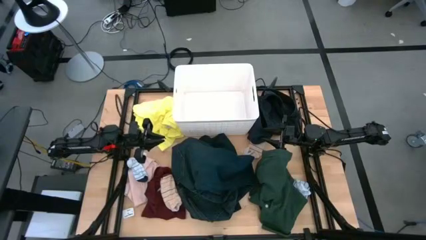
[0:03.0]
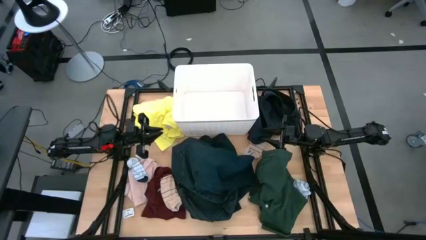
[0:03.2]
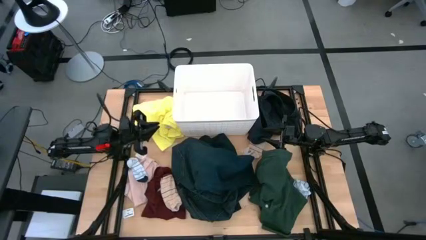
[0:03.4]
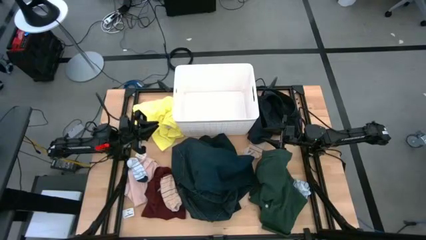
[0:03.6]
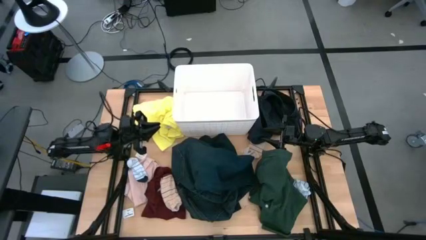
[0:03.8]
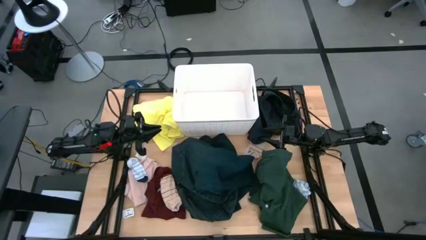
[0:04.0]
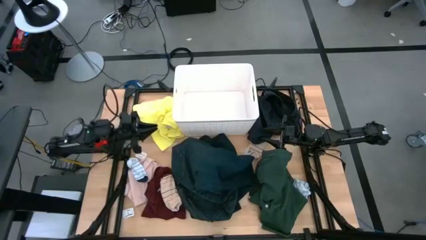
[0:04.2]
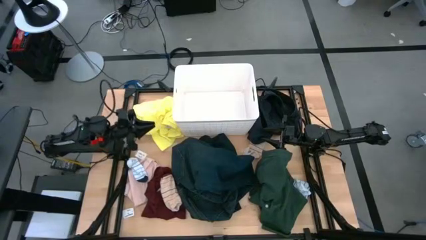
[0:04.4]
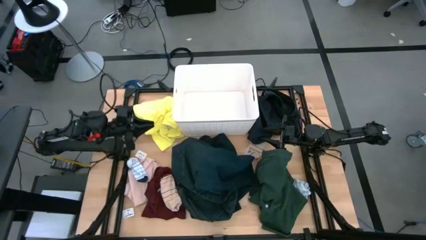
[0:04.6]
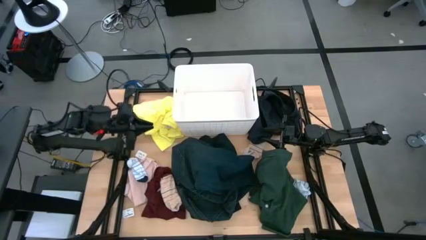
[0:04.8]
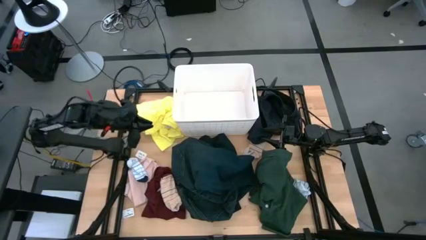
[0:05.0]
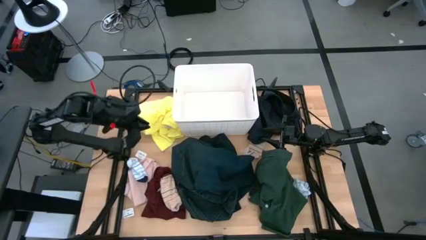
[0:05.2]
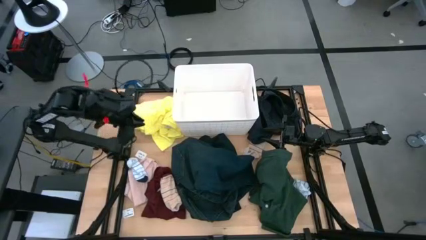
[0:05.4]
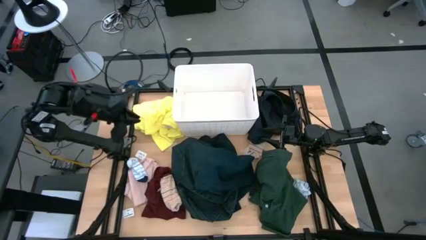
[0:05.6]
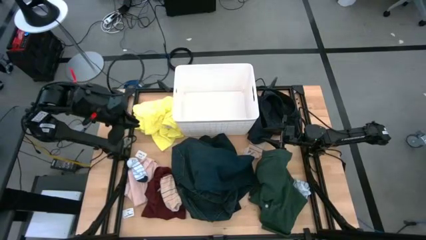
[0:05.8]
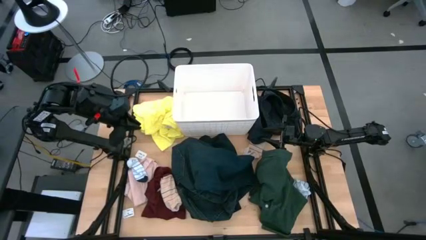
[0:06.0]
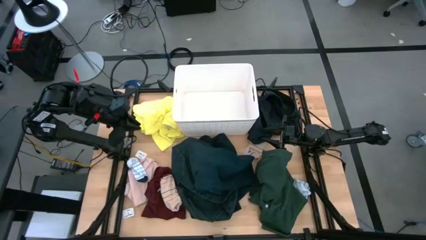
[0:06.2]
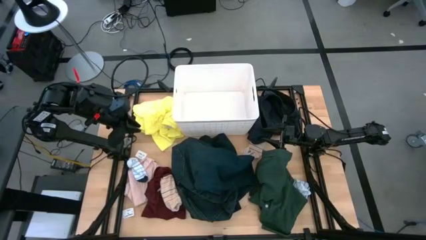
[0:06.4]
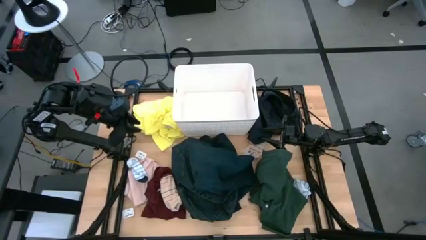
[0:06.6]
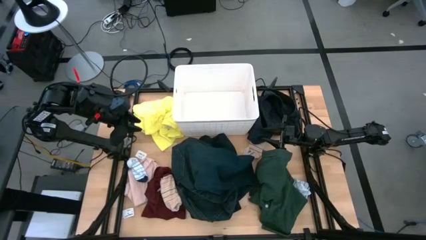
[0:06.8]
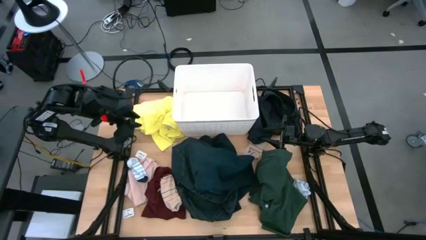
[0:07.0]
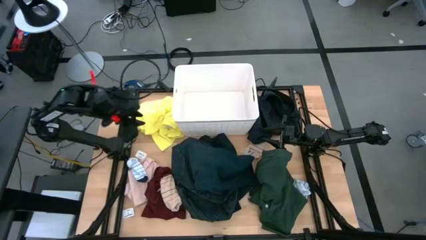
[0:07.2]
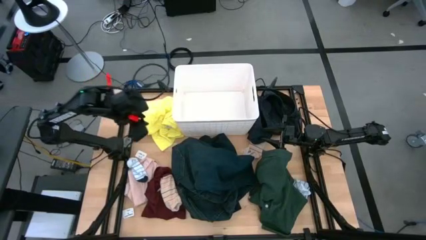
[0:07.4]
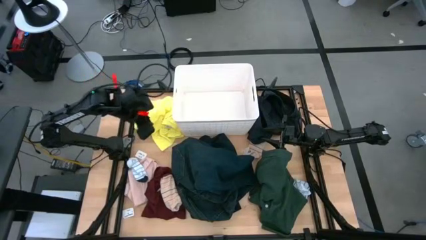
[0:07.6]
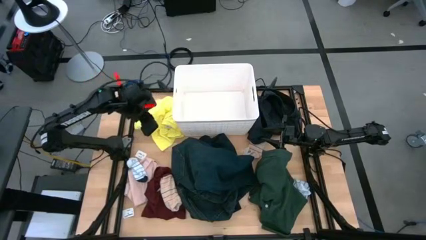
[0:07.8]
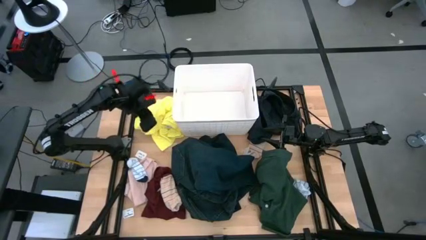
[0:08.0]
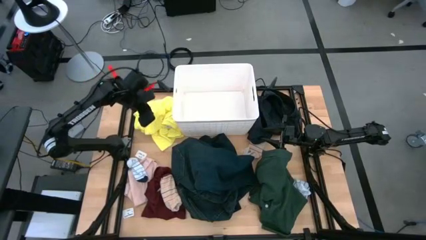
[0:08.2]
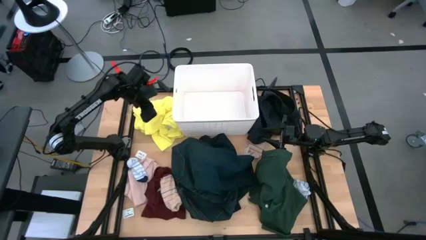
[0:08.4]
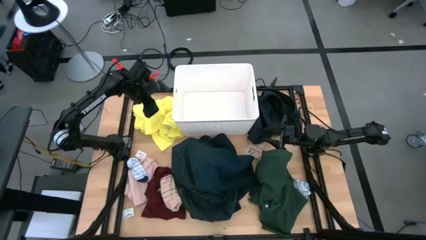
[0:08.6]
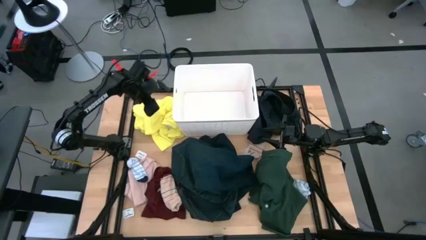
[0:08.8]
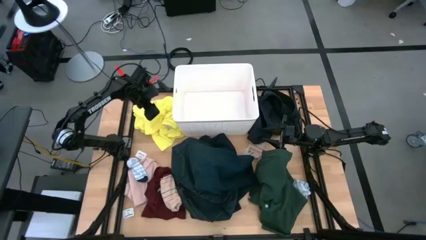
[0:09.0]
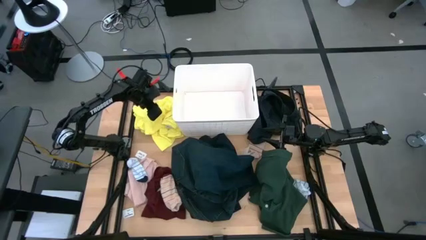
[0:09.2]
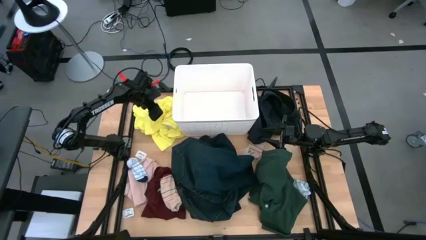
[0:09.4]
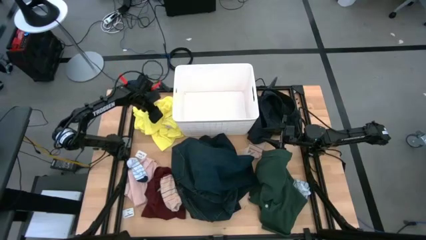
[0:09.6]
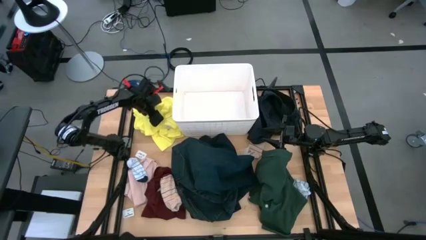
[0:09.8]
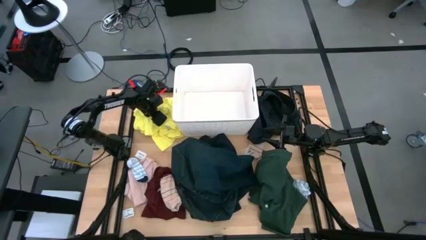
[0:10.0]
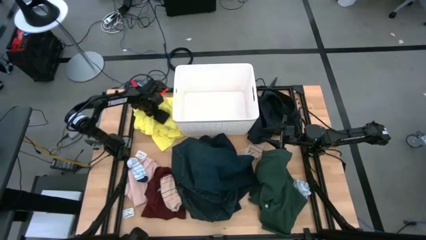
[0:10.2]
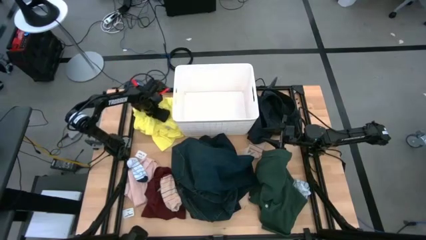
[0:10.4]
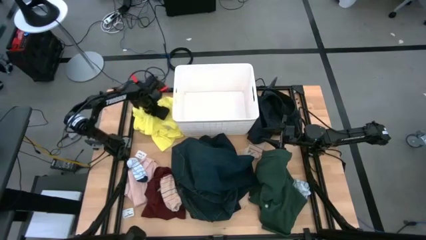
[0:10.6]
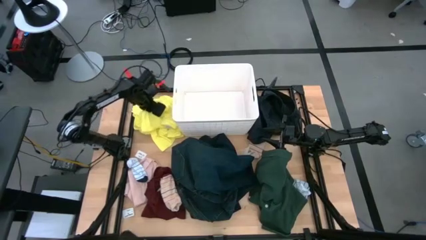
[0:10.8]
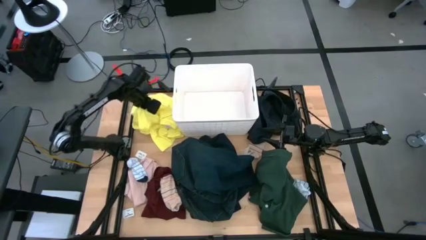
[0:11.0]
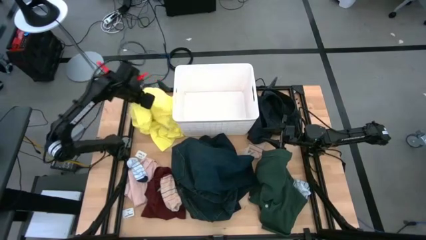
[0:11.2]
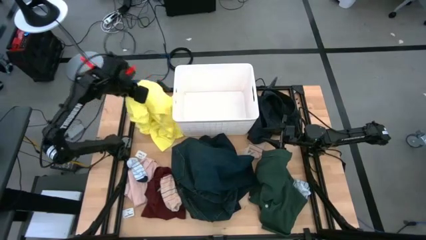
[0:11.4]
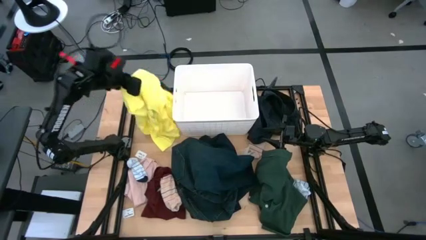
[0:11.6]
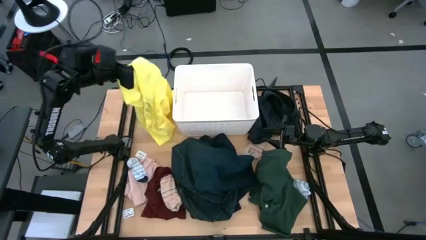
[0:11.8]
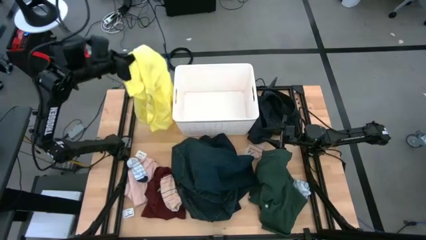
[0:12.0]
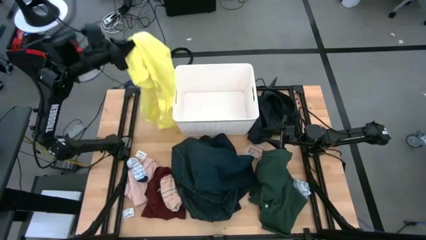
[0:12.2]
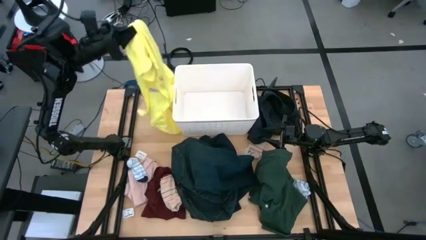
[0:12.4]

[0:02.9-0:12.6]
Task: Sort clothes
Put the yellow shirt into the white laundry bin

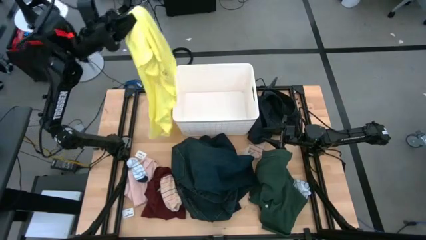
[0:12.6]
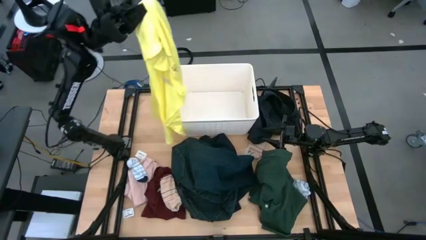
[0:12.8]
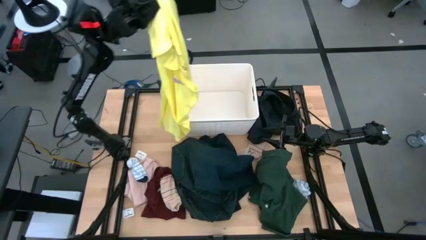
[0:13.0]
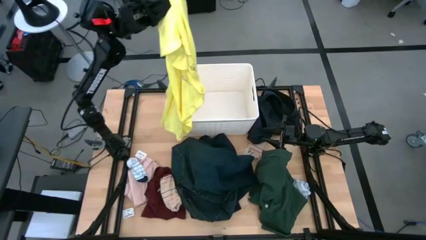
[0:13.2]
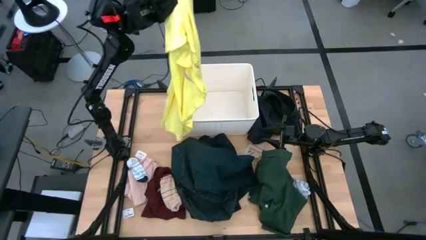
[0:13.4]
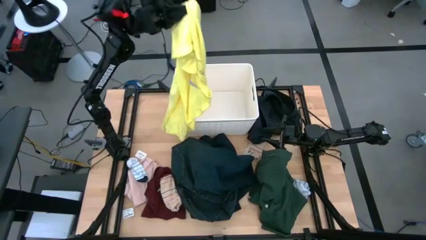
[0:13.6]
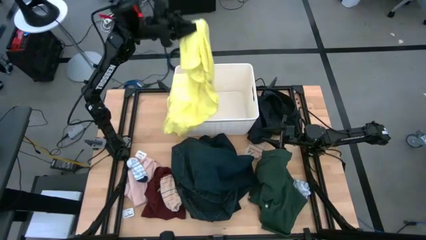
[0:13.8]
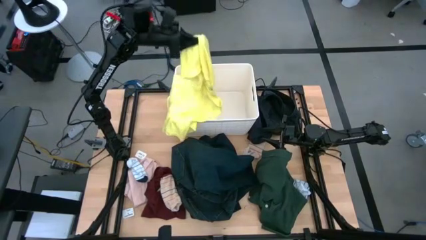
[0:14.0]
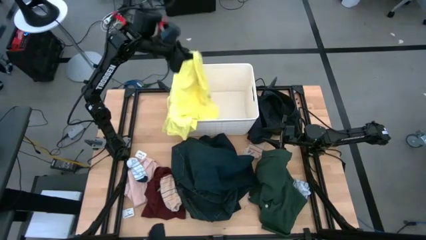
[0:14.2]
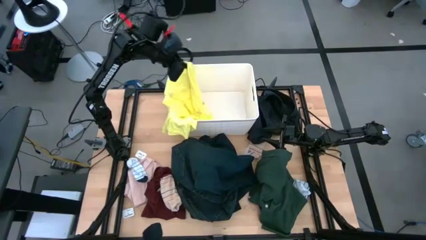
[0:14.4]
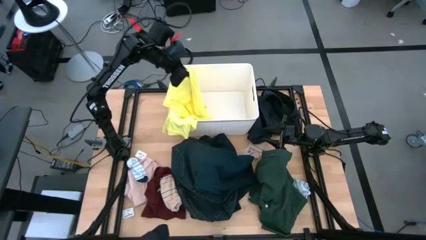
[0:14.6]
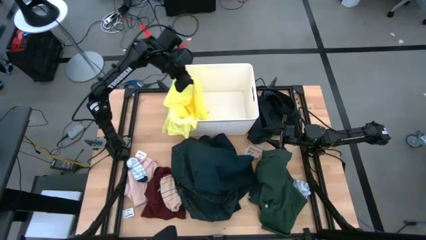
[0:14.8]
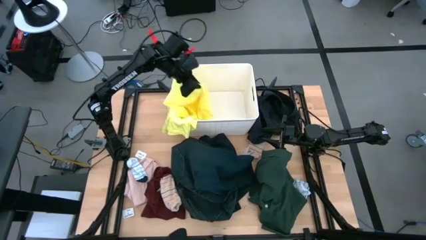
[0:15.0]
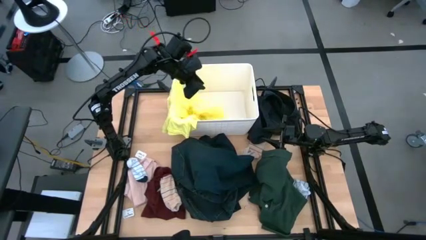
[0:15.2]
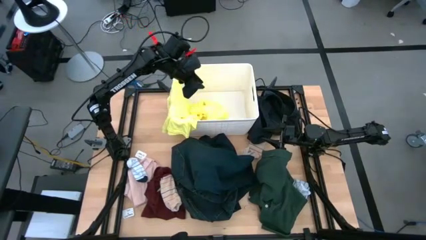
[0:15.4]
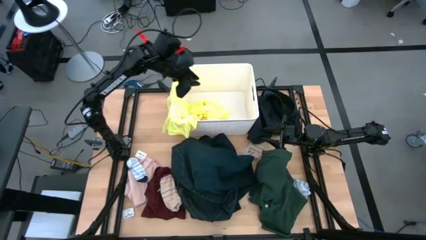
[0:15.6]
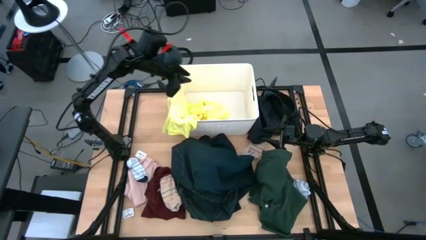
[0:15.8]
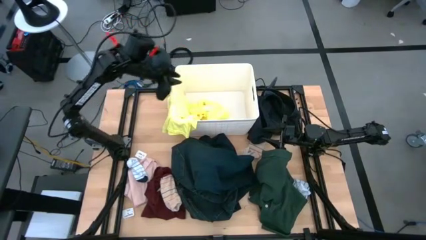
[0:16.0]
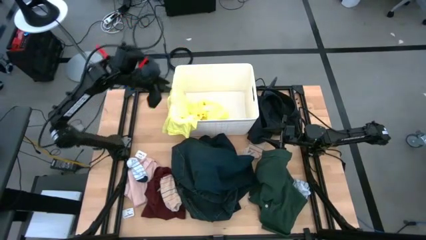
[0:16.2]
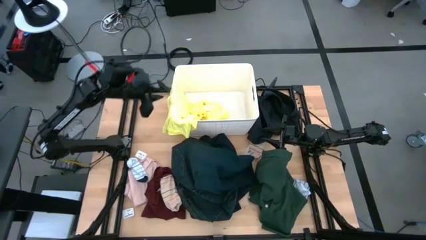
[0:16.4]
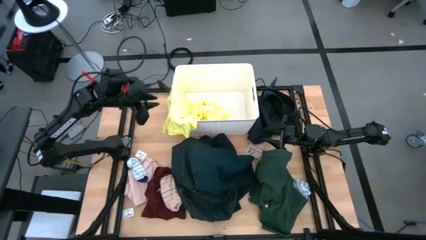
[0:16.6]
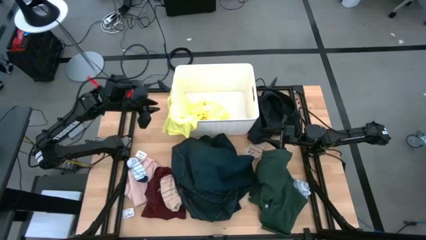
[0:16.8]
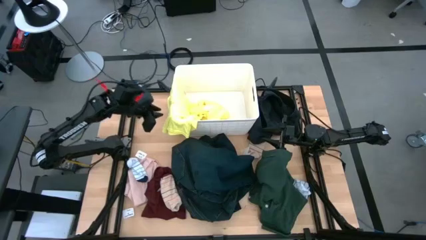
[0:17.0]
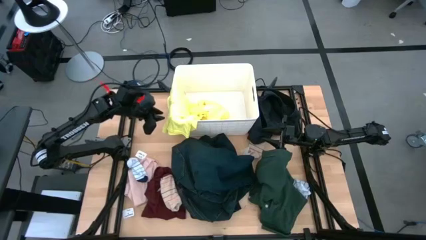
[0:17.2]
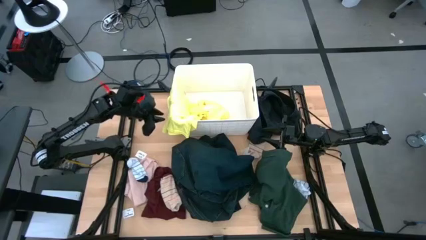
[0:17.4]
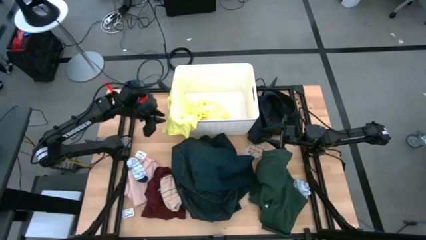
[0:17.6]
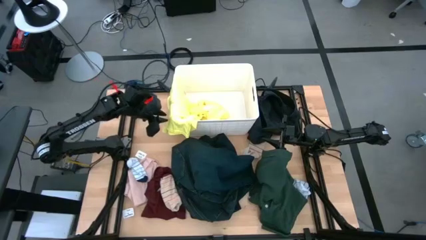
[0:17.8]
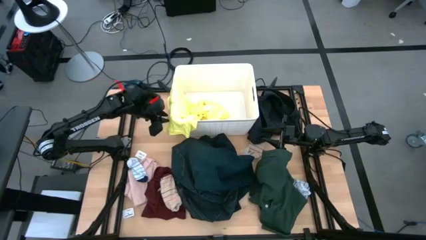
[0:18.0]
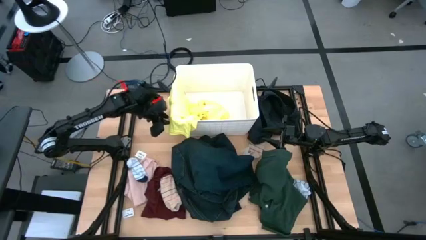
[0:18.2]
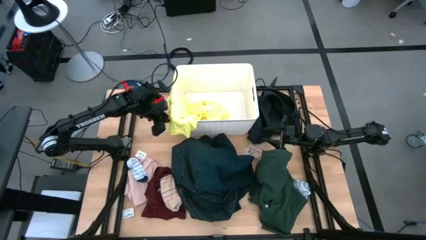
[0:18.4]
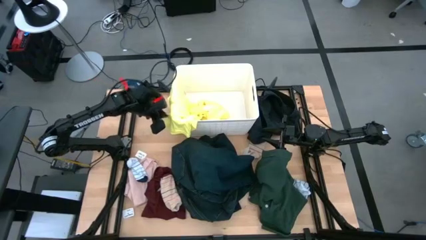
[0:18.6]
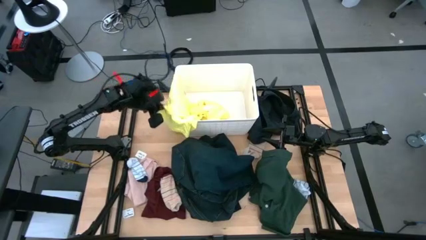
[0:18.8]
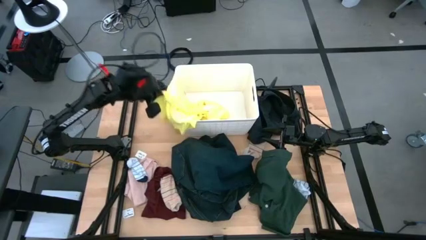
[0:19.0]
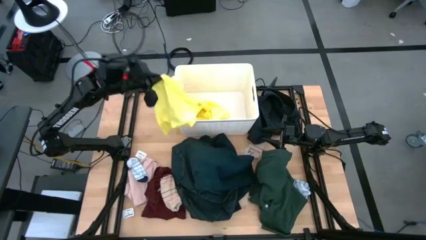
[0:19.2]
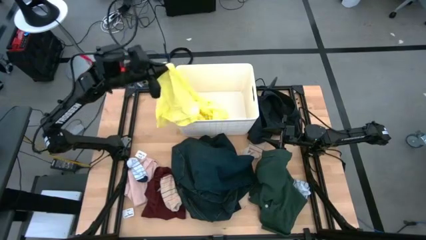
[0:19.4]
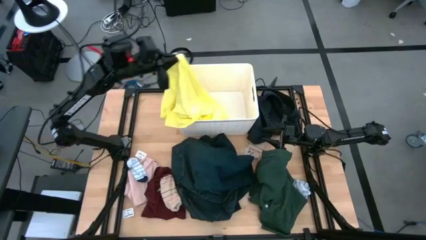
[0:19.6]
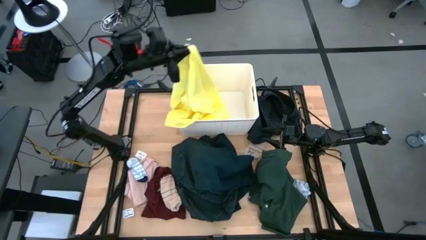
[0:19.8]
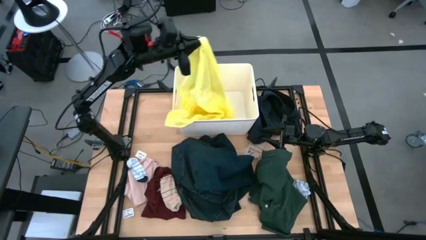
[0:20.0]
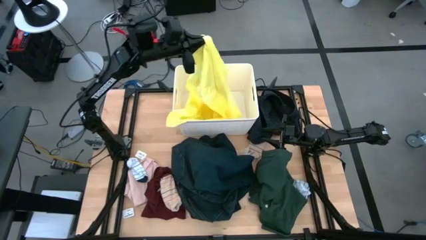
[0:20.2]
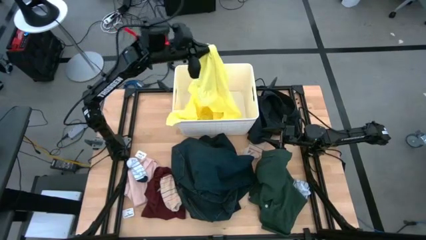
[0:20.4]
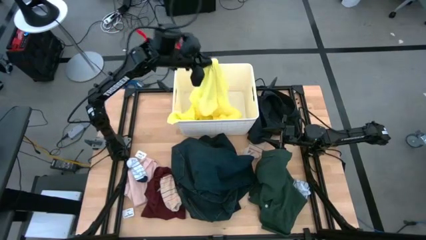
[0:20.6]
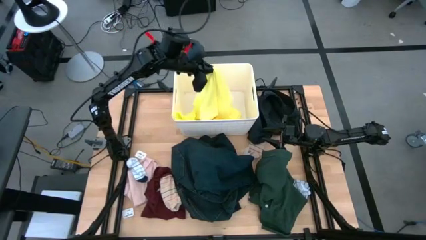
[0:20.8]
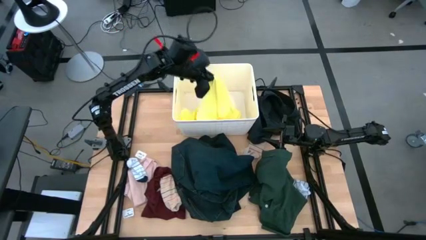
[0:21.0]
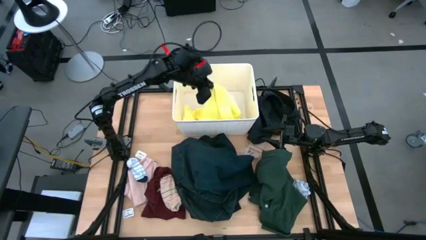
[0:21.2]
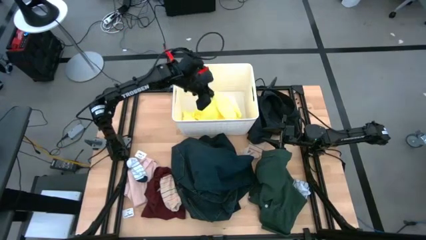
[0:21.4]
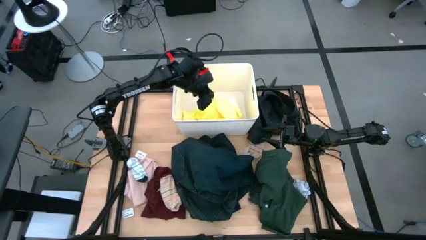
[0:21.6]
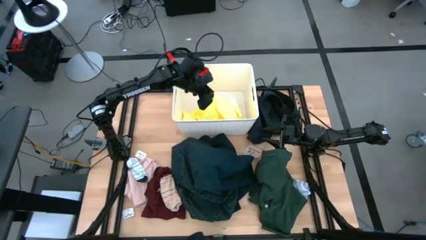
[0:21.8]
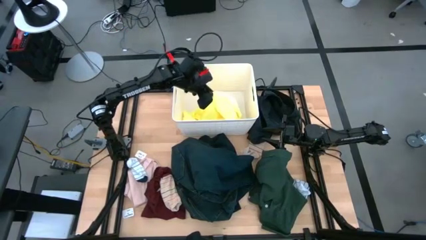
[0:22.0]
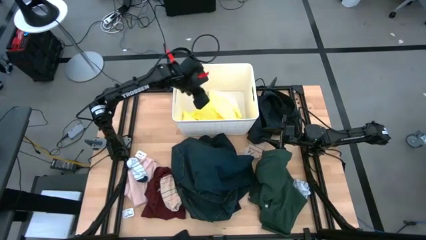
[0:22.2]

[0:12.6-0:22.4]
Put the yellow shirt into the white laundry bin
